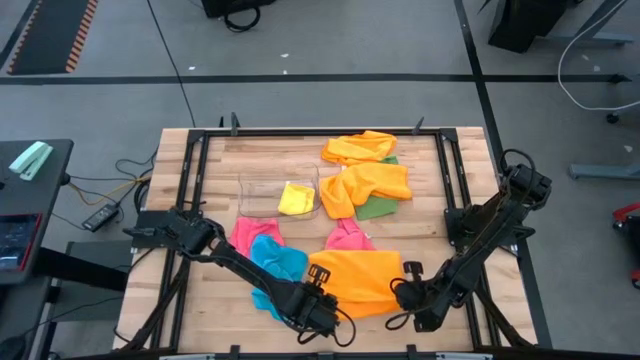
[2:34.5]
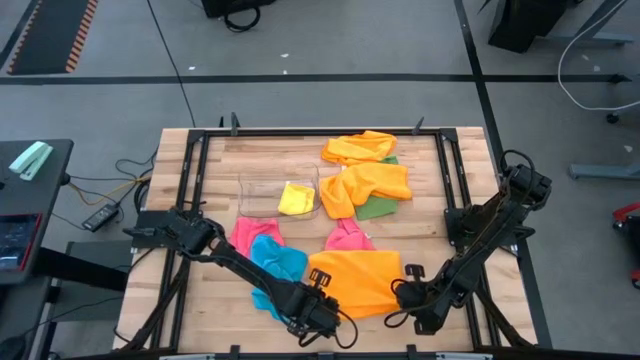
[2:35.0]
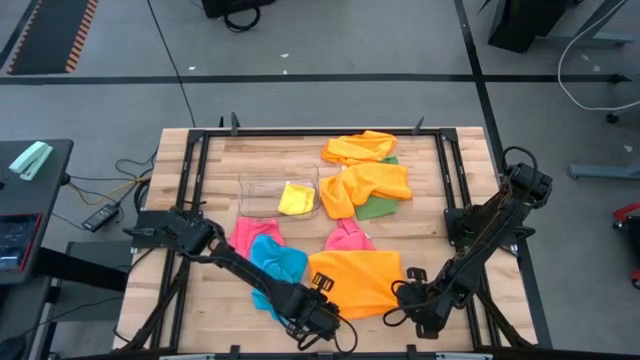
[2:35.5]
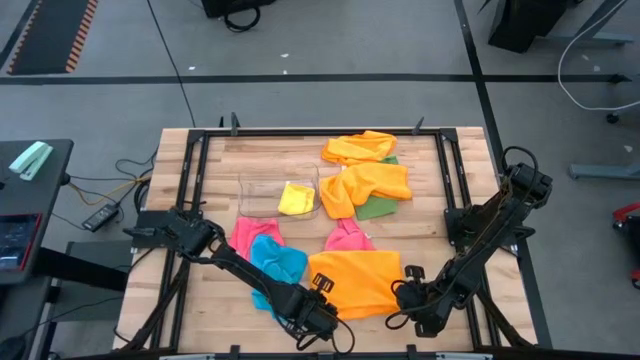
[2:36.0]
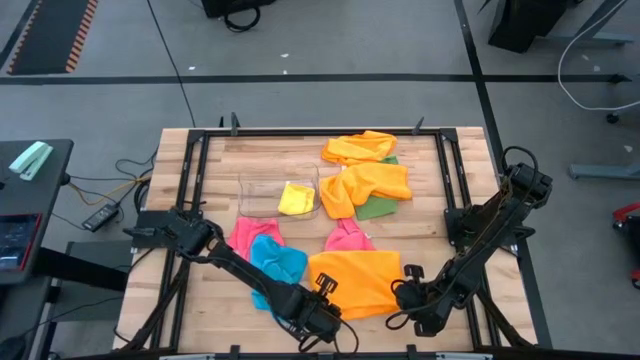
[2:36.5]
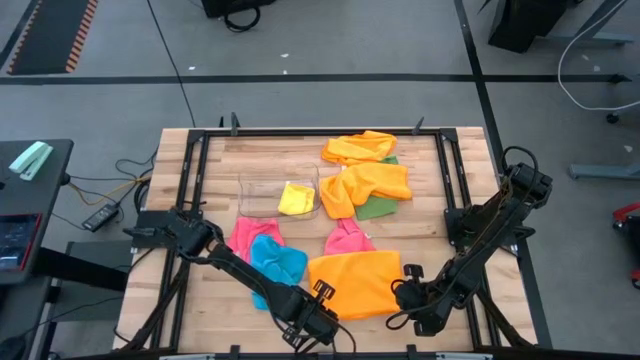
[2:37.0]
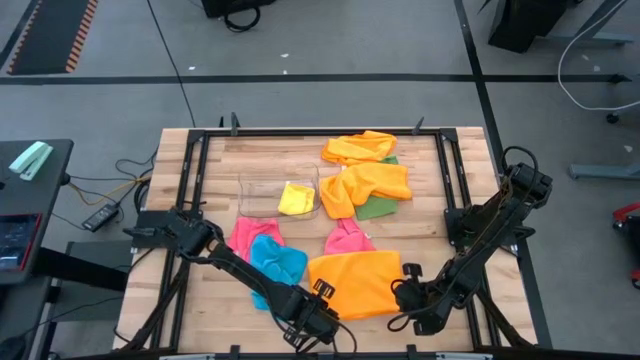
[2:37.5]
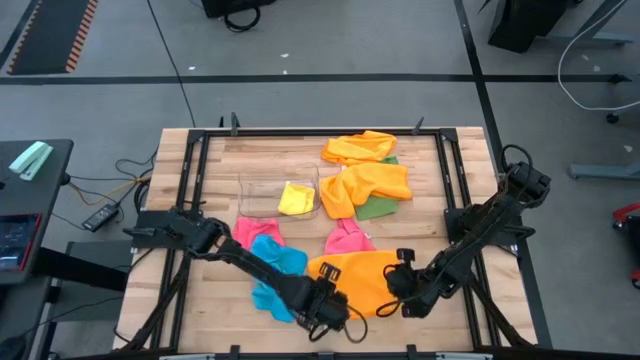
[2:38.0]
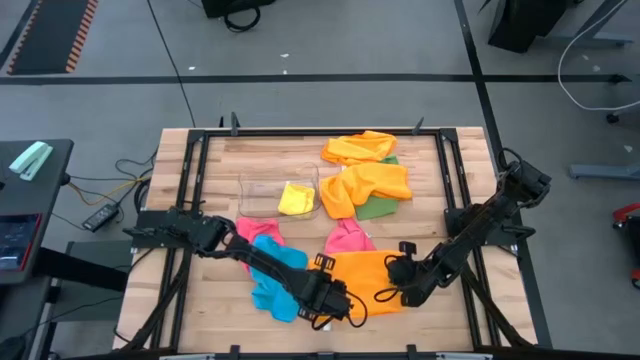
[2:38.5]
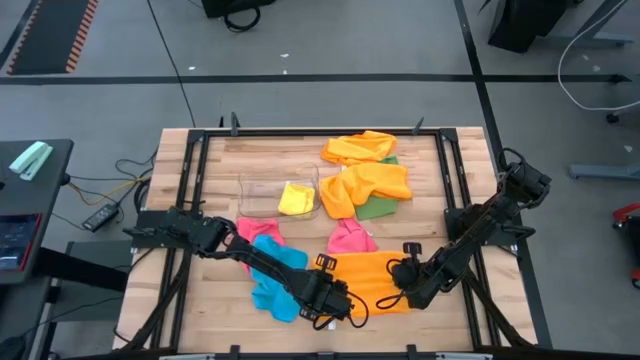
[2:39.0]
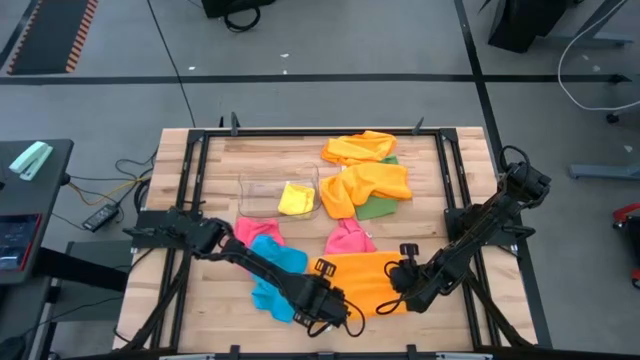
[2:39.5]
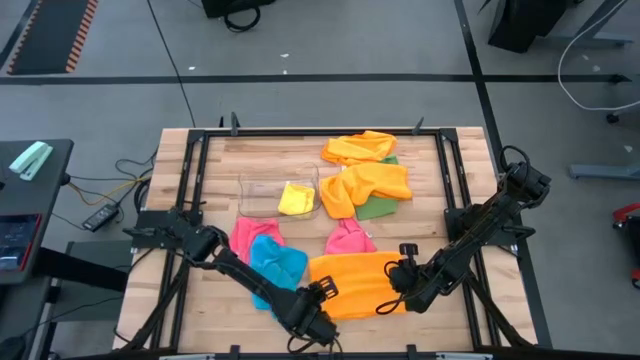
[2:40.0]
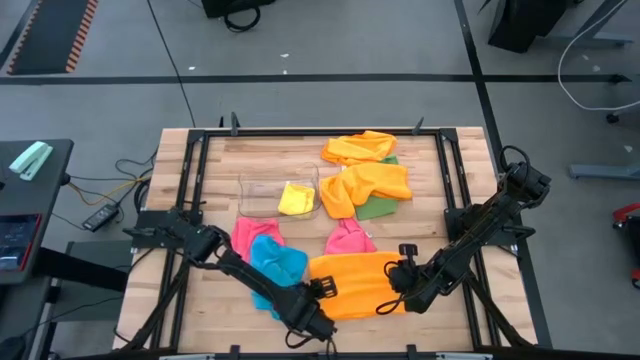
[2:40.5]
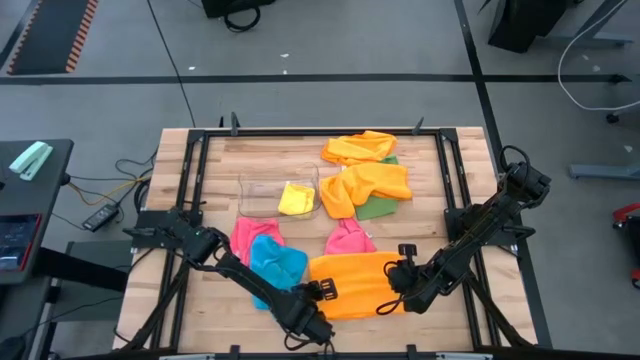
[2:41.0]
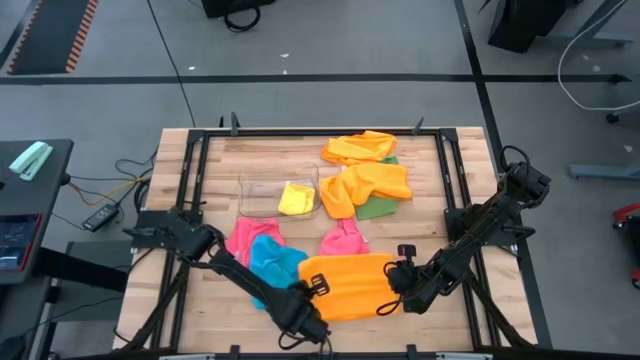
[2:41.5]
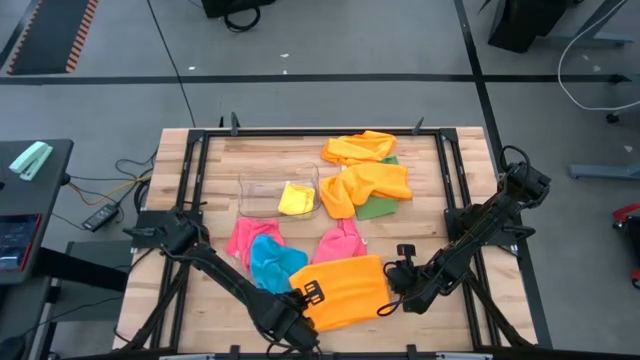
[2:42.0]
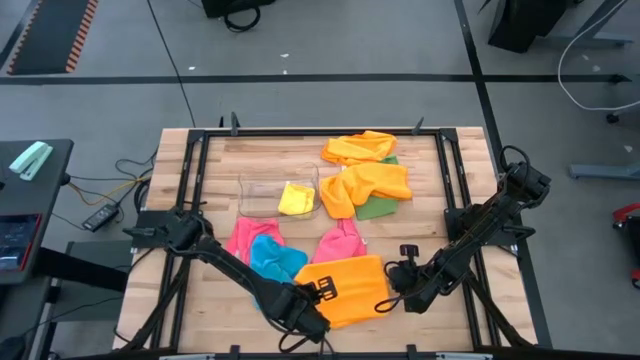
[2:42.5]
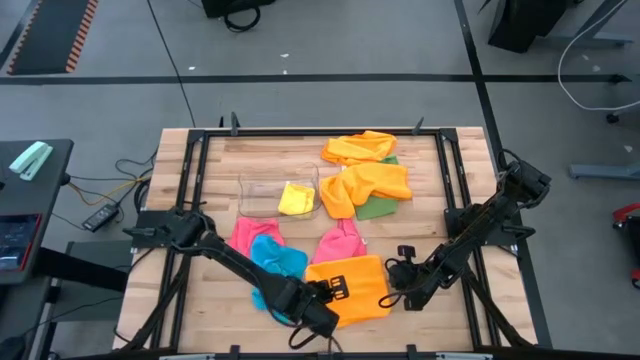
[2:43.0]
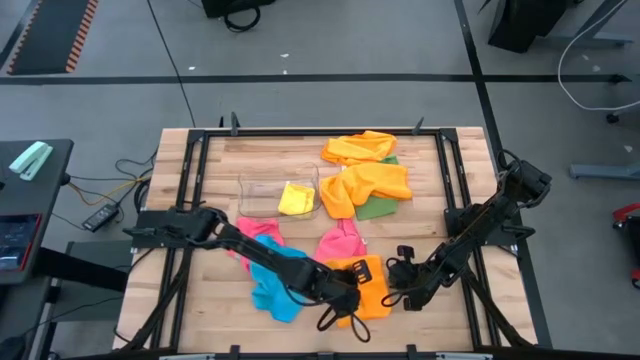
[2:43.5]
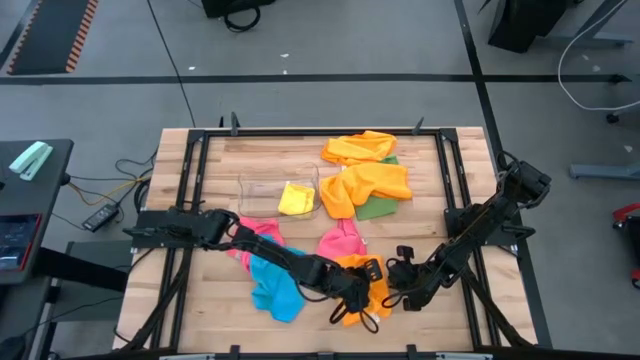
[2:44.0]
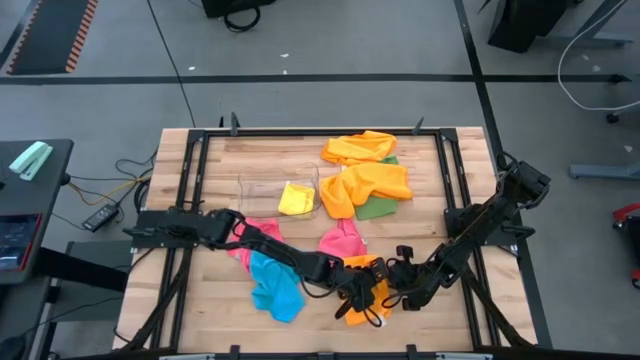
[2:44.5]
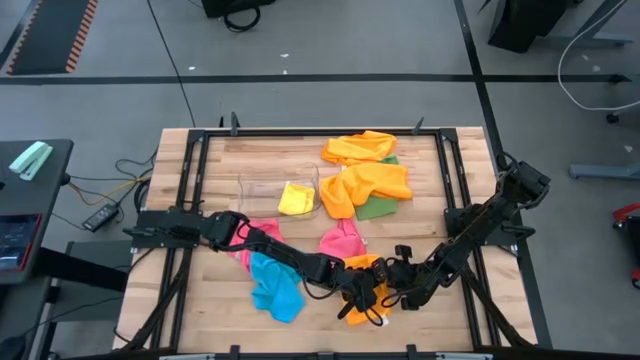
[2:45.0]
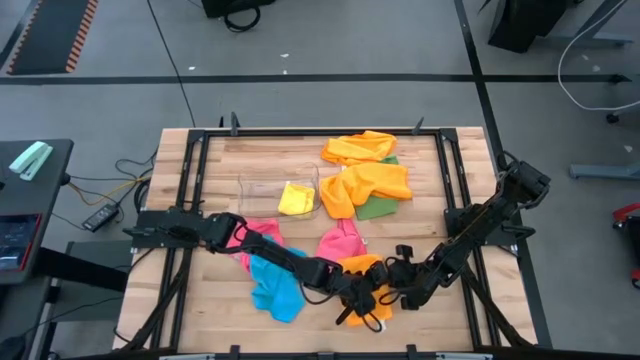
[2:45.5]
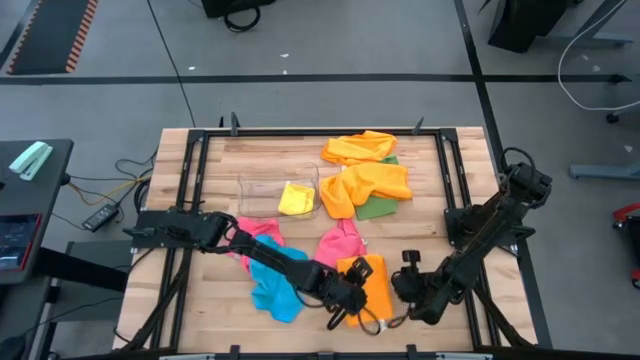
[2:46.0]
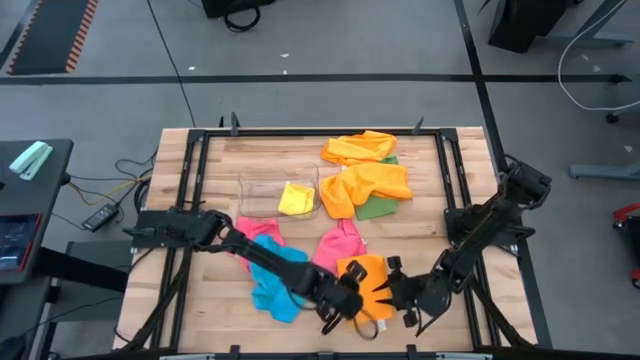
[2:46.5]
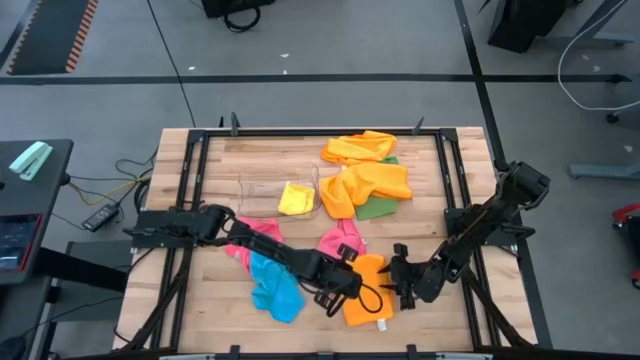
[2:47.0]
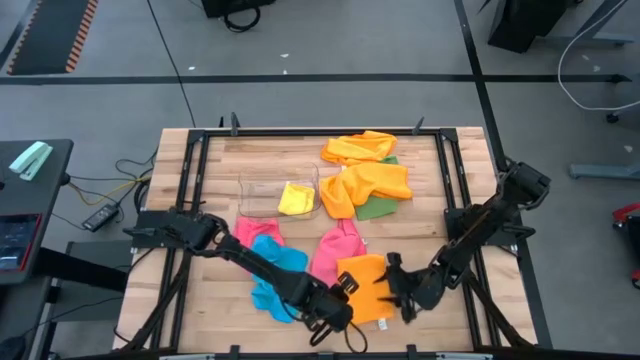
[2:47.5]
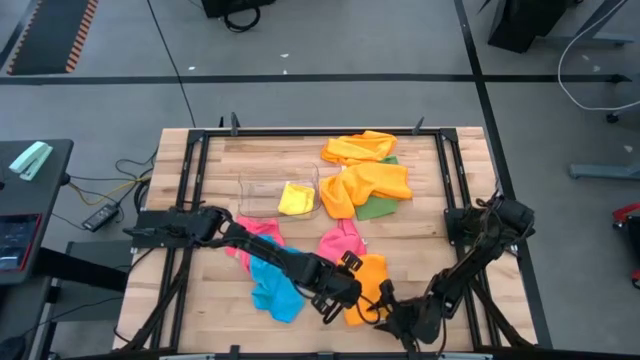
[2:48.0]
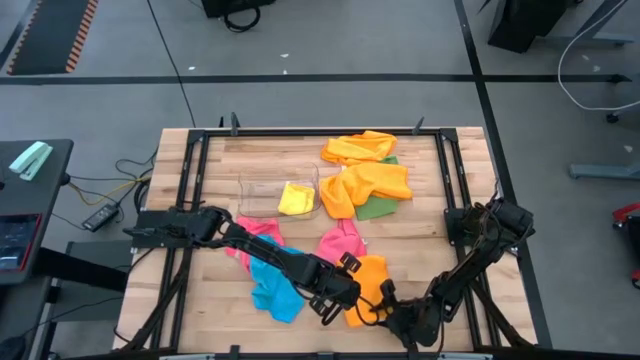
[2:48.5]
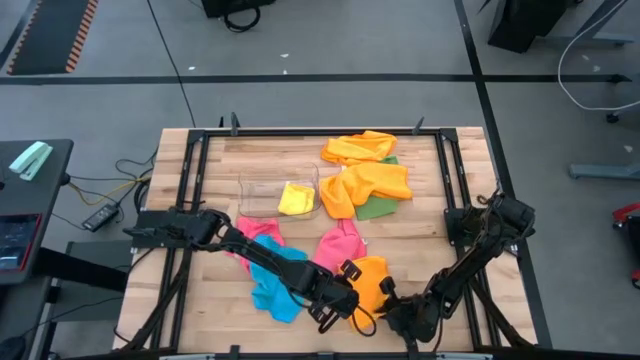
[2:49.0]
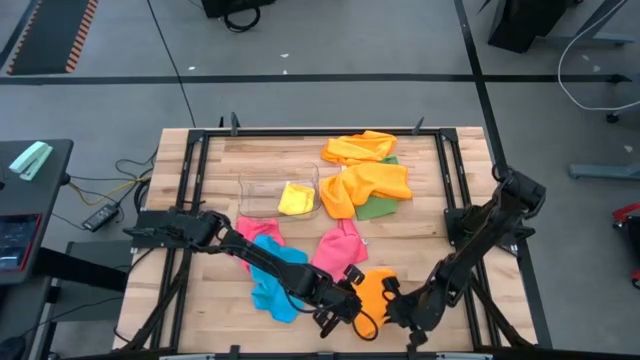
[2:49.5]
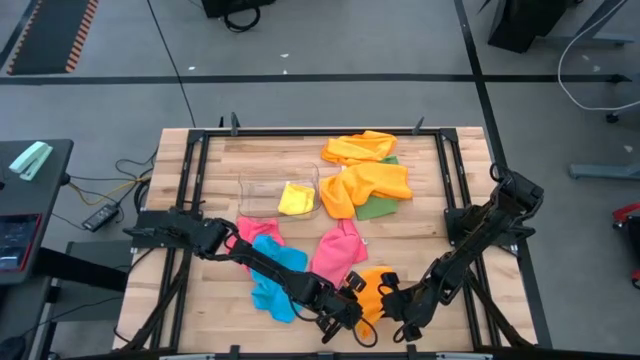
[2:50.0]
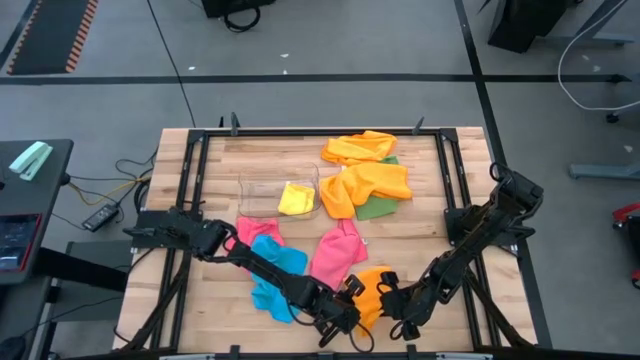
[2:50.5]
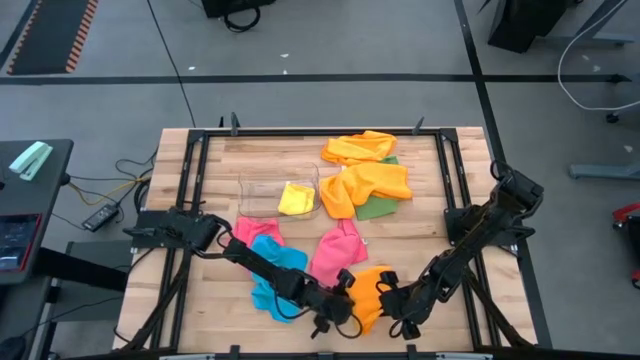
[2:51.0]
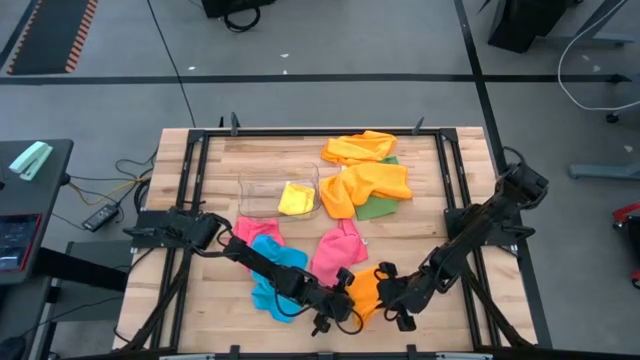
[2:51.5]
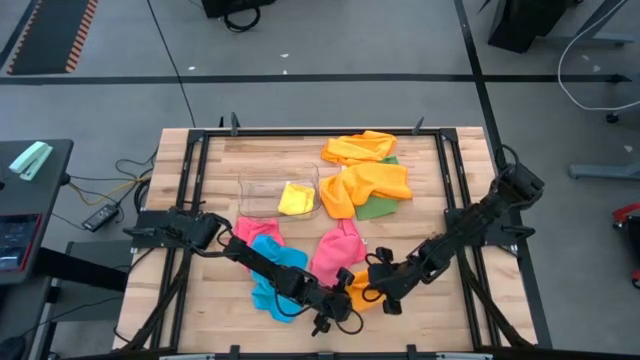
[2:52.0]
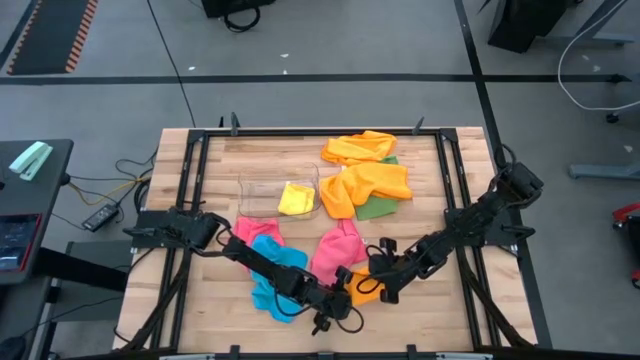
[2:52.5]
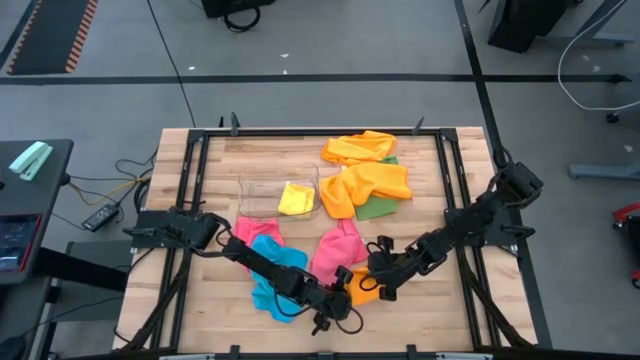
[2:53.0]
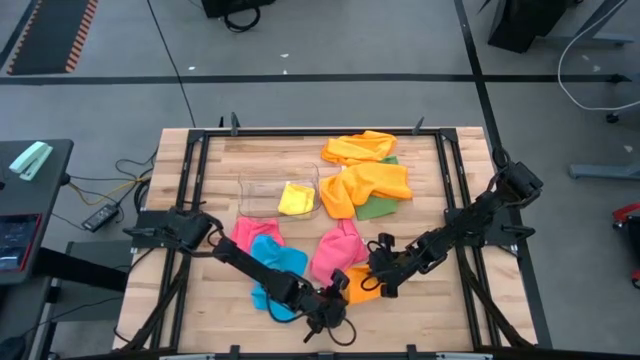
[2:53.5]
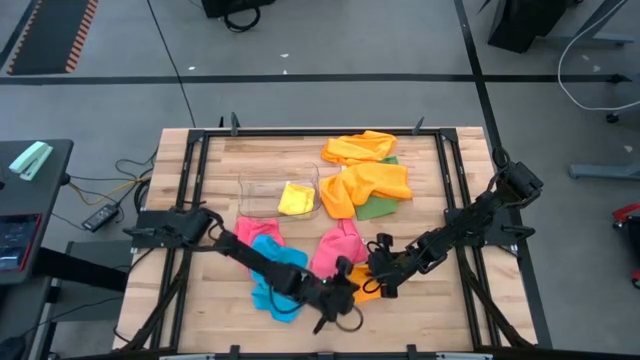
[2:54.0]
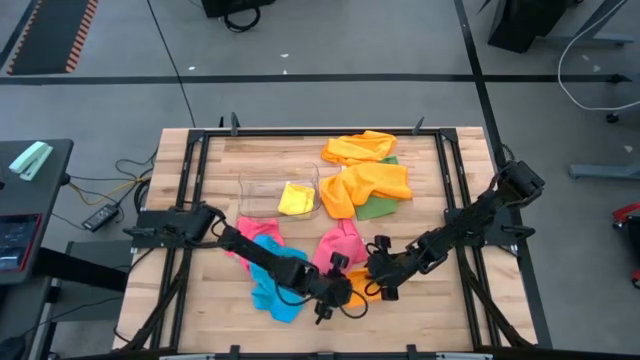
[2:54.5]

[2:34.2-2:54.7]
Task: Fold microfiber towels
Fold the bottom orange microfiber cloth
